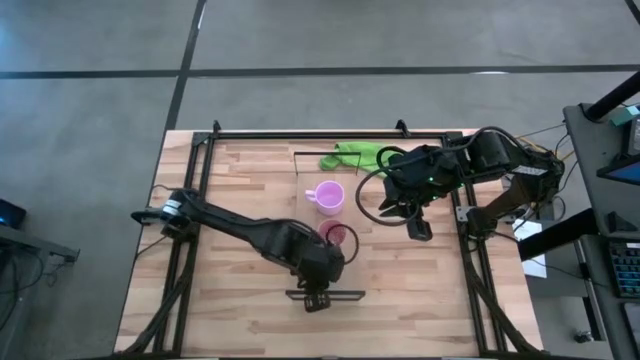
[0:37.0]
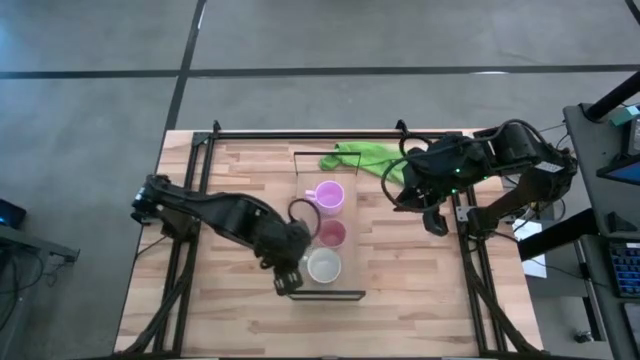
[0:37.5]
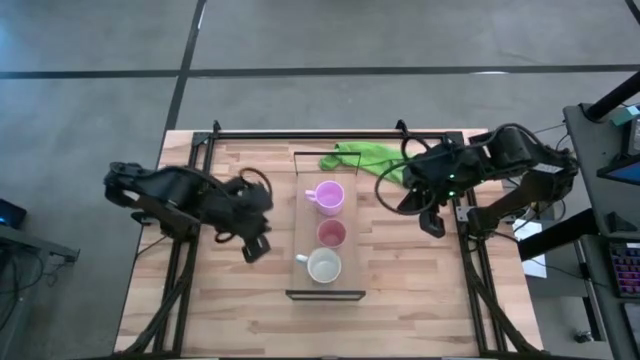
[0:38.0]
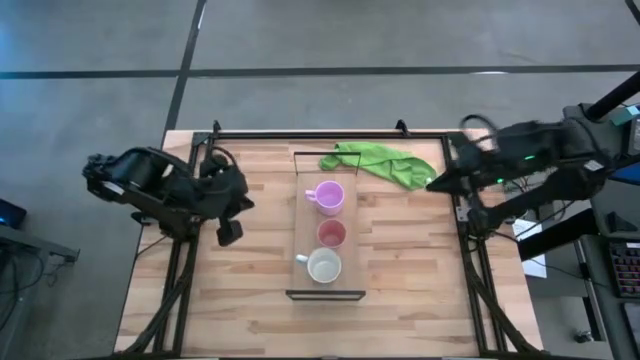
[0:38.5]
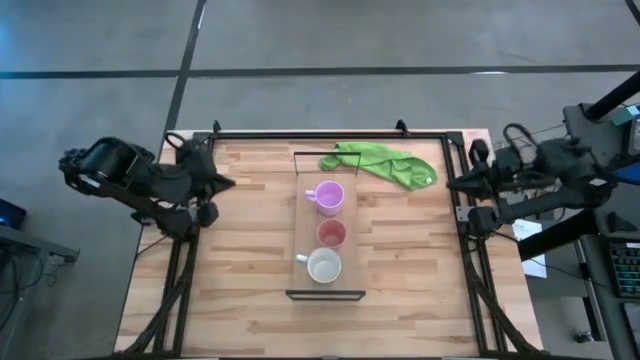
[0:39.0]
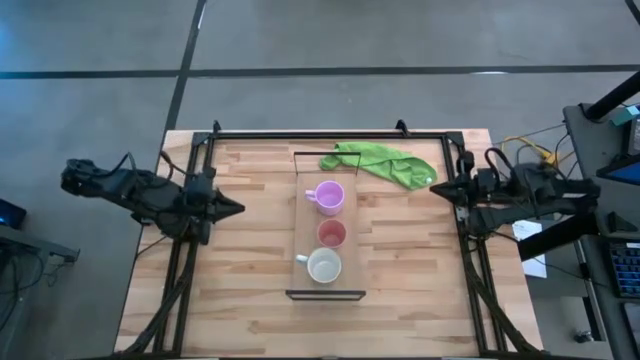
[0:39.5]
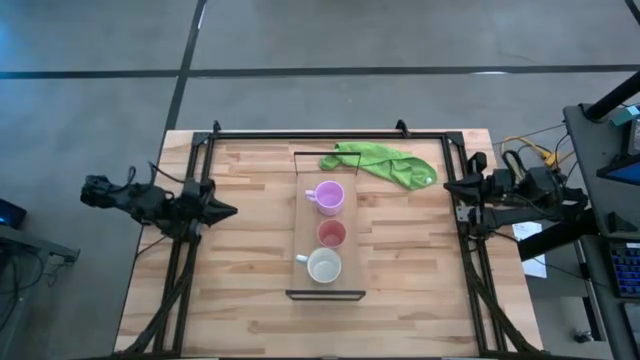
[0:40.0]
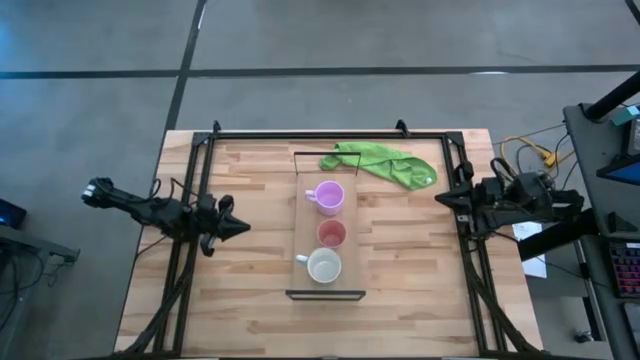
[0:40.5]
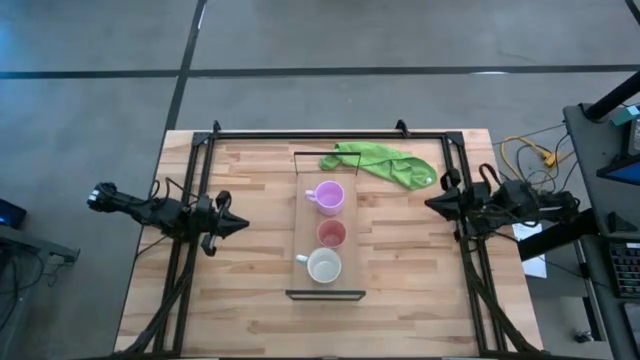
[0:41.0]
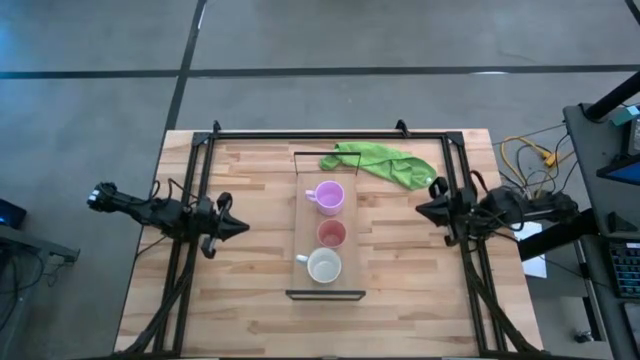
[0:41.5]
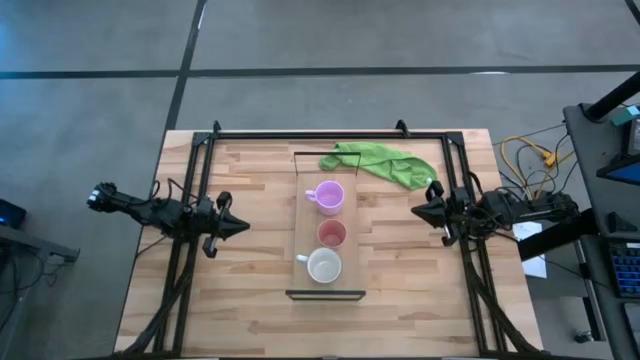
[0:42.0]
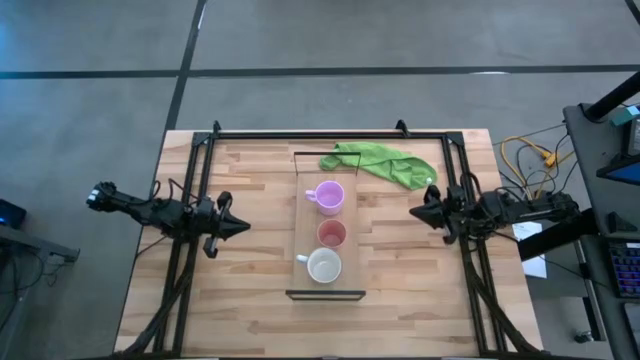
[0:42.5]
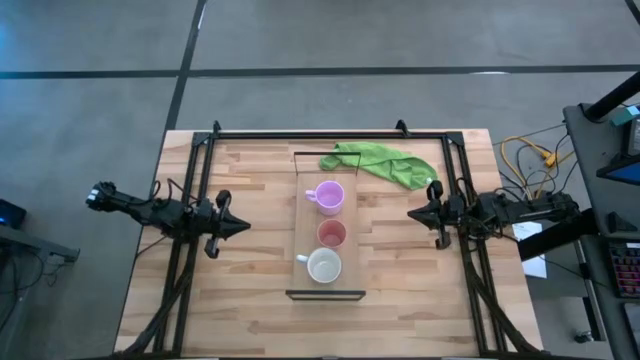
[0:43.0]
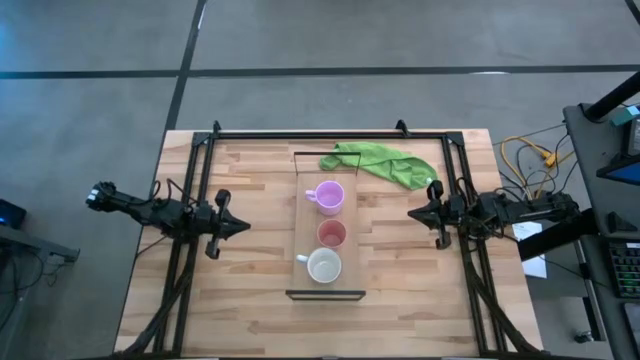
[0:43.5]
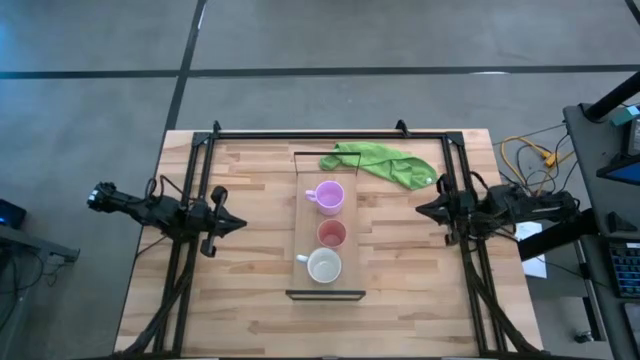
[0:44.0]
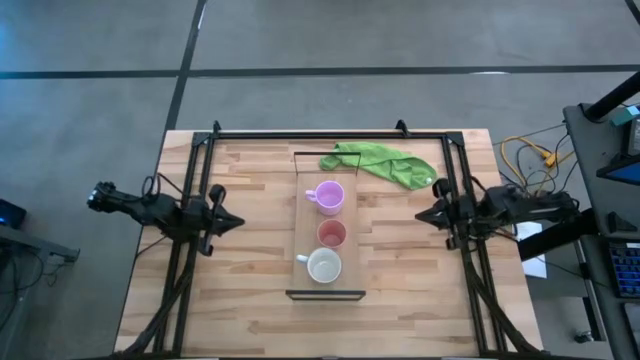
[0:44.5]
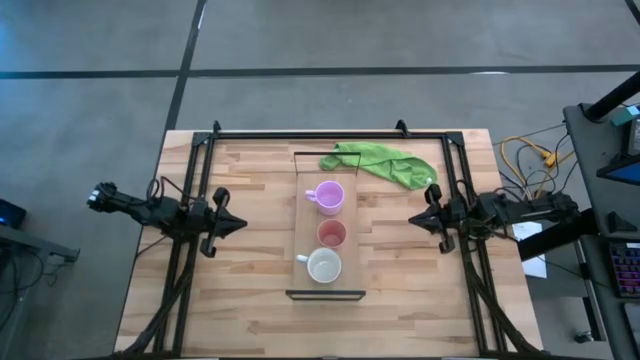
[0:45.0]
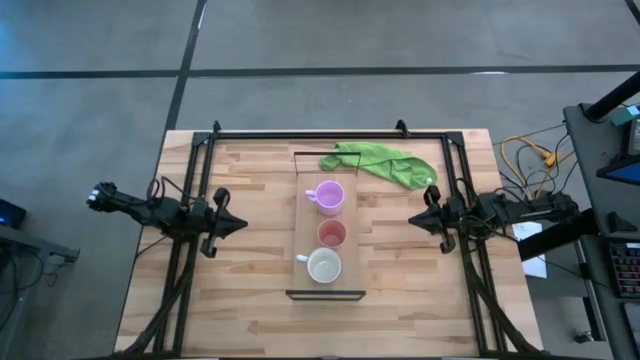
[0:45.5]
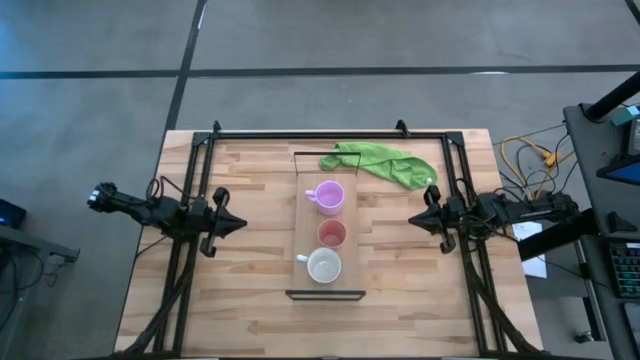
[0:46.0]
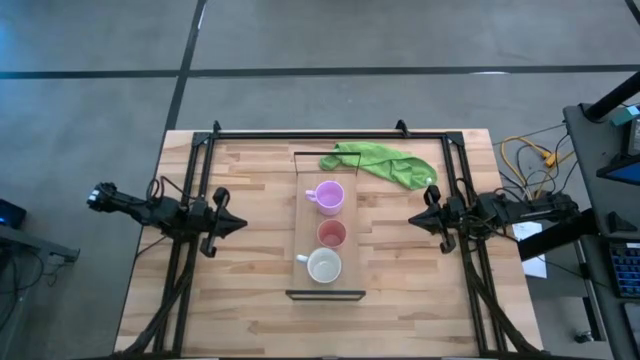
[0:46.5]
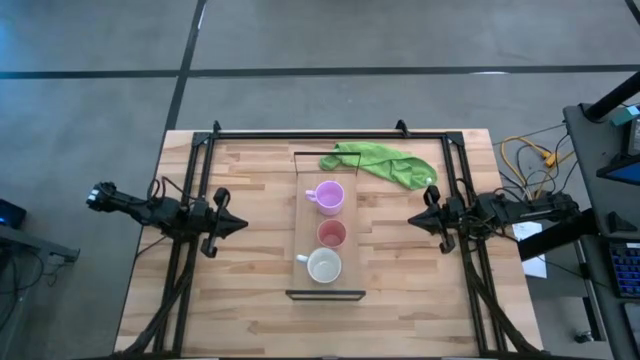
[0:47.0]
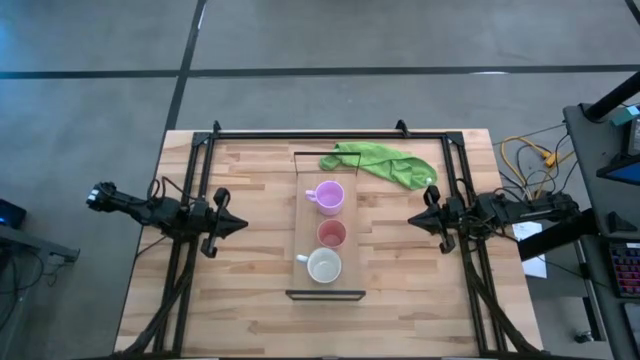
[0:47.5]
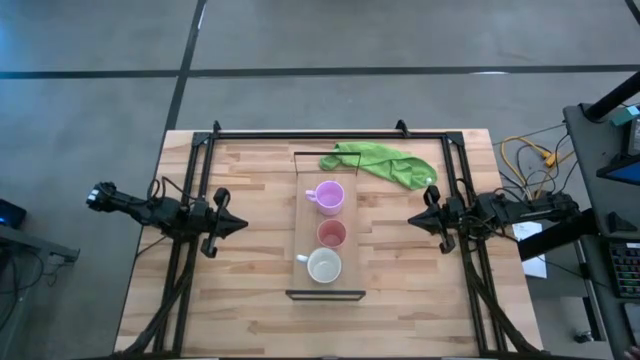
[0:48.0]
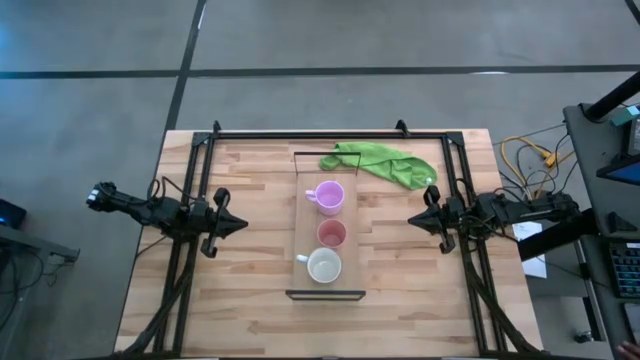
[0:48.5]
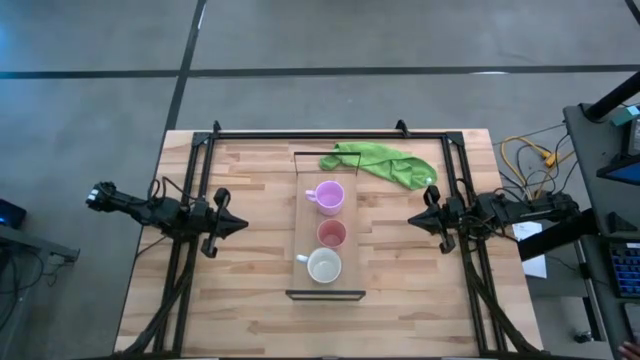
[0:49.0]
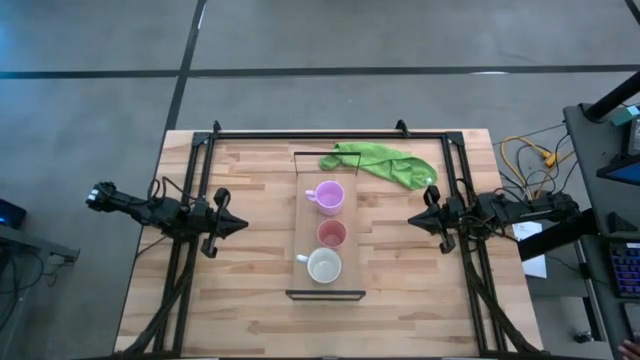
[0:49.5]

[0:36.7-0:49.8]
Task: Stack small to large cups/mugs on shelf
Return to Home Position

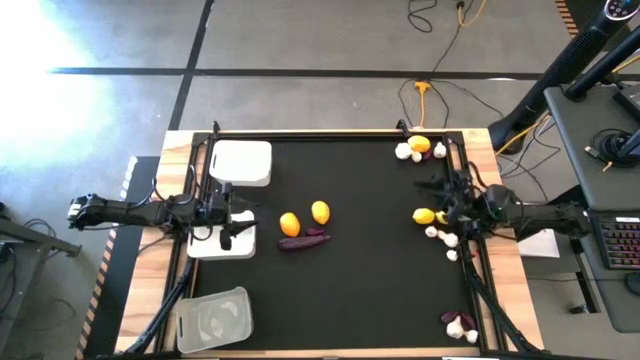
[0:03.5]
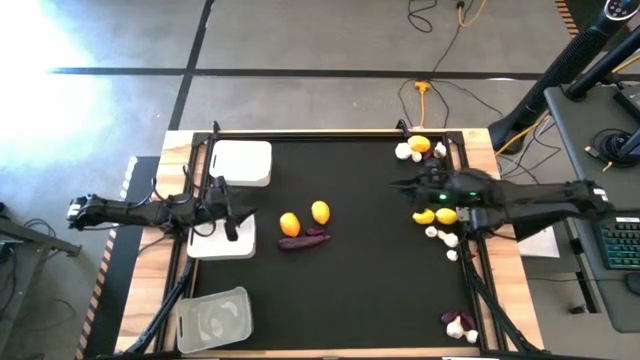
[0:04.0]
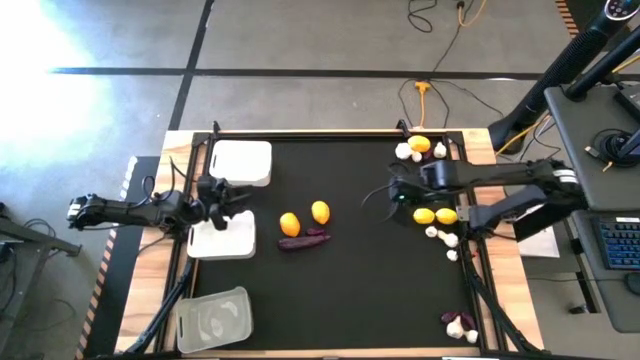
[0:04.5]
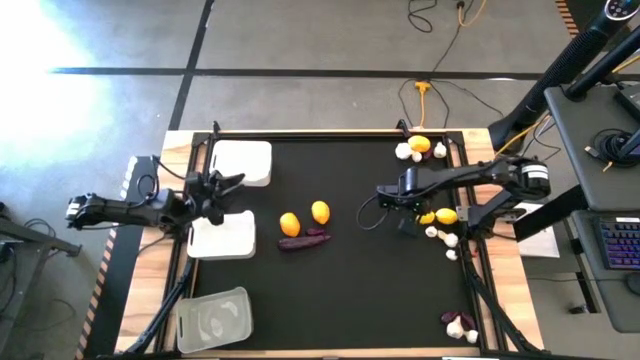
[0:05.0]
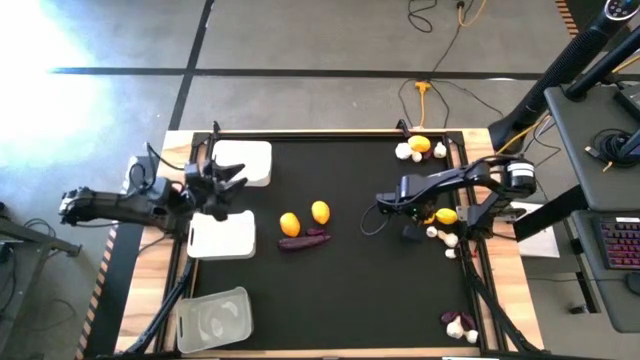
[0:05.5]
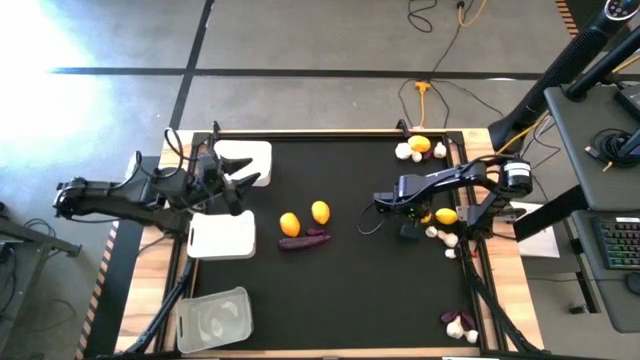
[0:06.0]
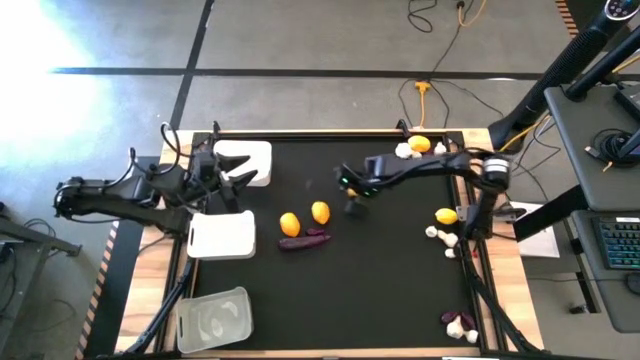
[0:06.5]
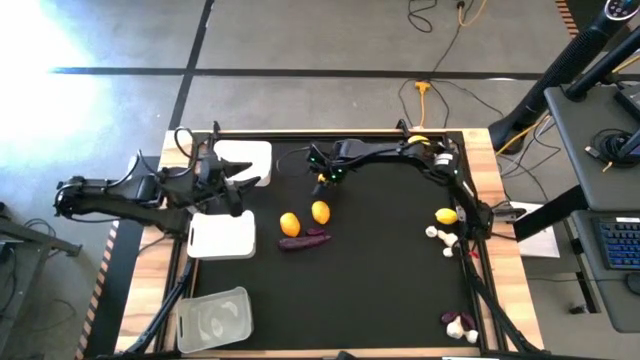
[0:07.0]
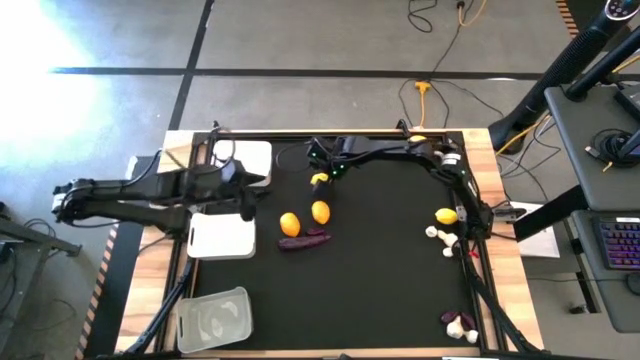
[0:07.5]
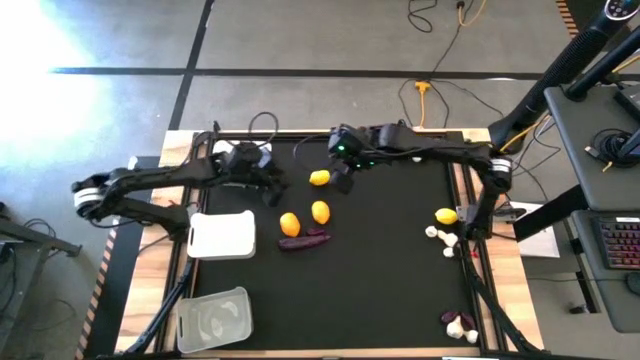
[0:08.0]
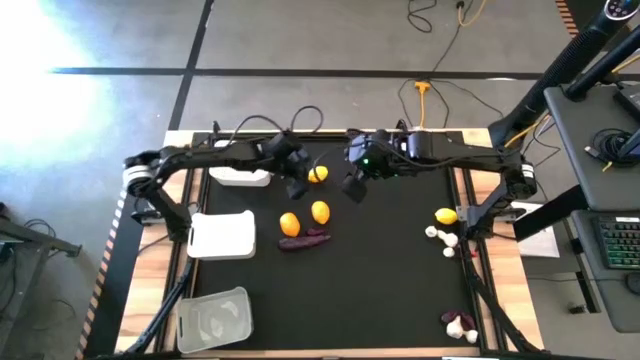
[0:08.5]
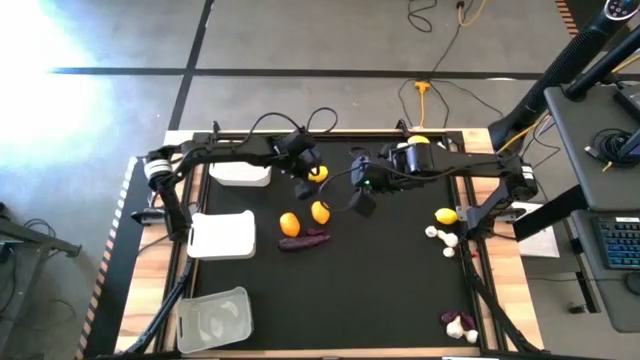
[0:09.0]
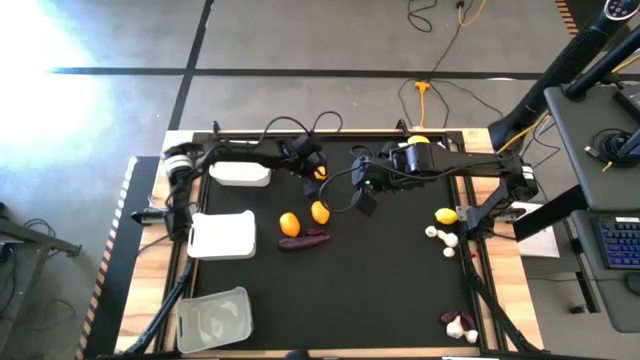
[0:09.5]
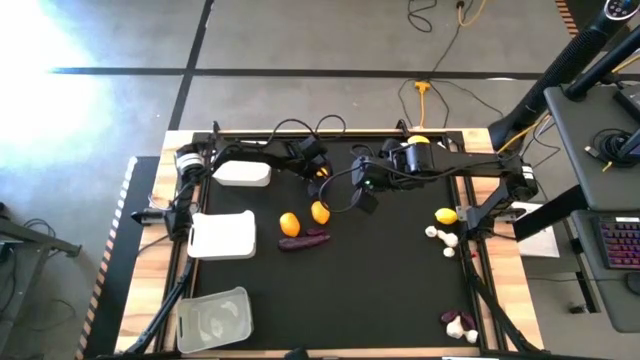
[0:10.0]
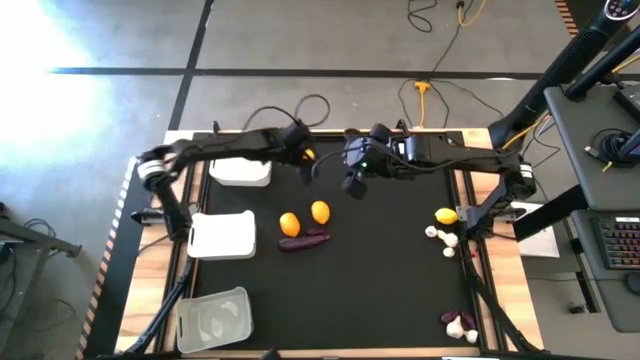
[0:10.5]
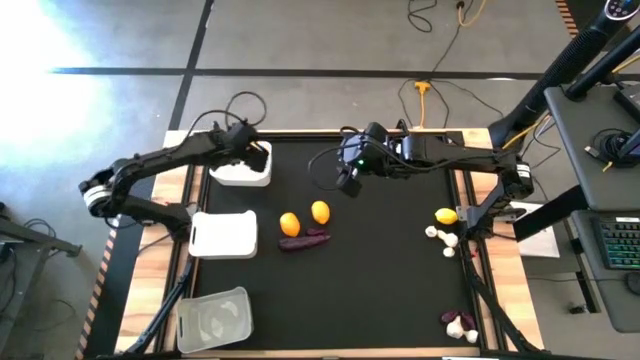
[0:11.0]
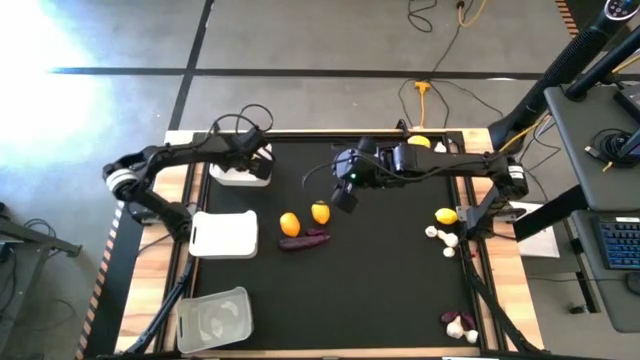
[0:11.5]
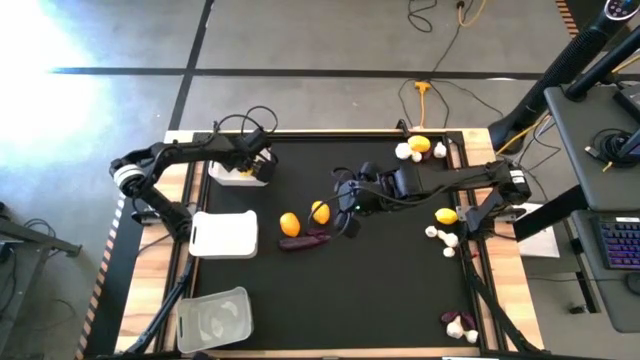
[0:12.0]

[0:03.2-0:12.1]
Task: Sort produce into baskets
Put the lemon into the top white bin
